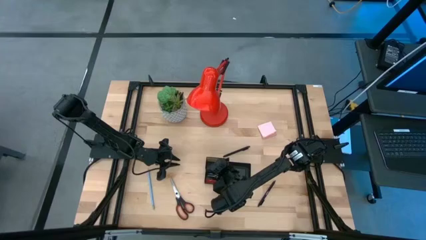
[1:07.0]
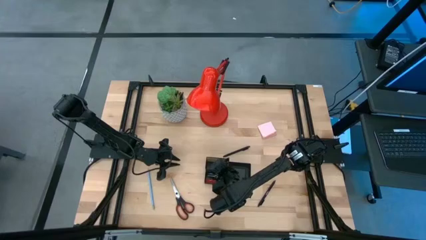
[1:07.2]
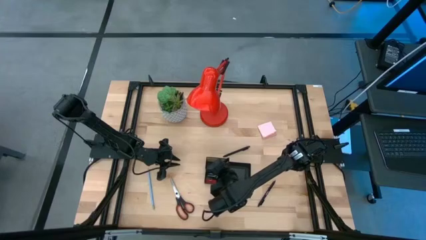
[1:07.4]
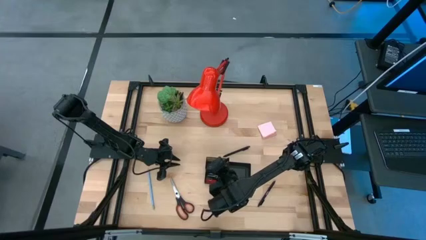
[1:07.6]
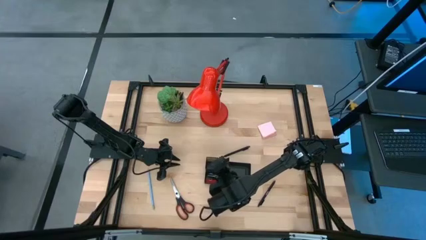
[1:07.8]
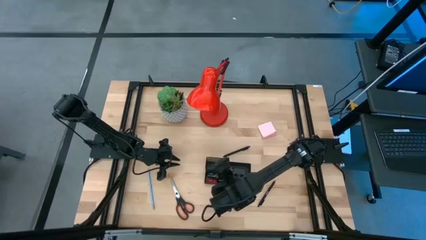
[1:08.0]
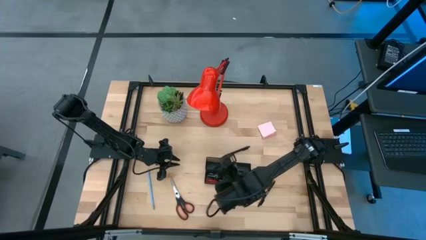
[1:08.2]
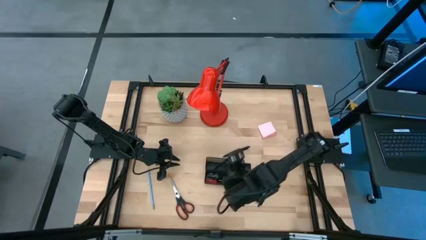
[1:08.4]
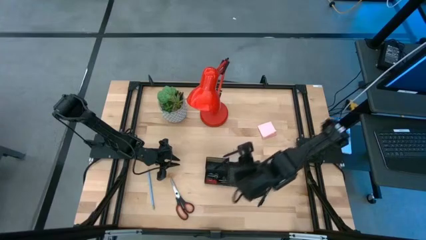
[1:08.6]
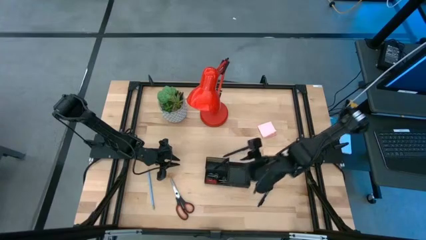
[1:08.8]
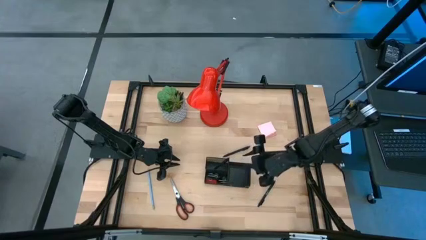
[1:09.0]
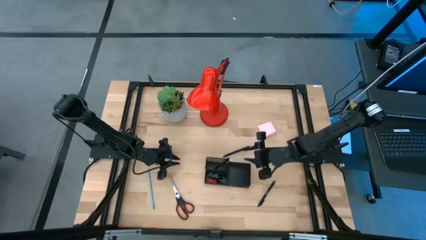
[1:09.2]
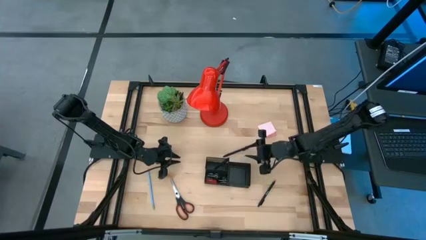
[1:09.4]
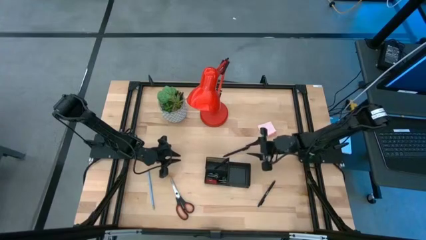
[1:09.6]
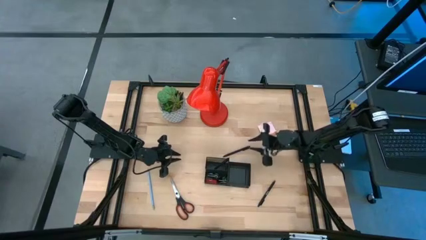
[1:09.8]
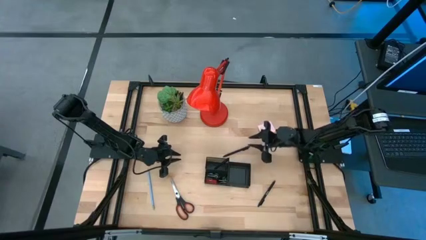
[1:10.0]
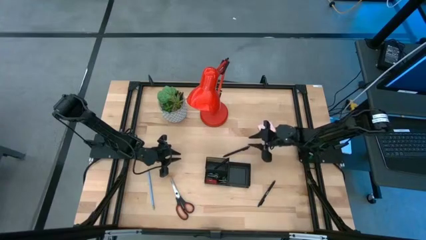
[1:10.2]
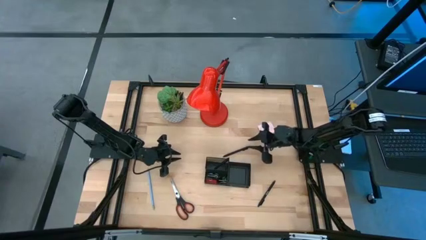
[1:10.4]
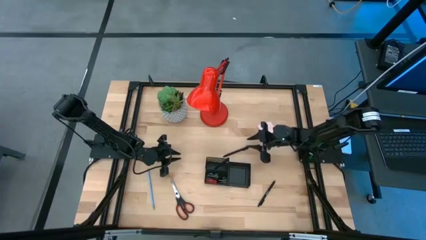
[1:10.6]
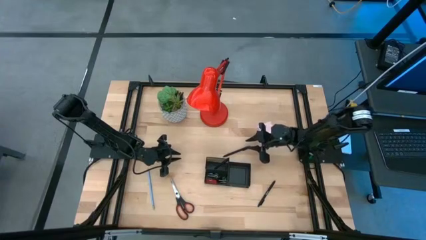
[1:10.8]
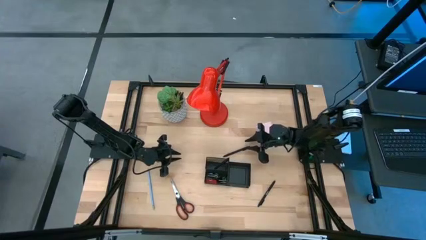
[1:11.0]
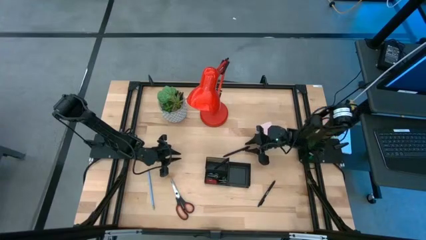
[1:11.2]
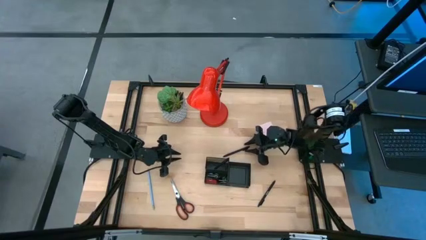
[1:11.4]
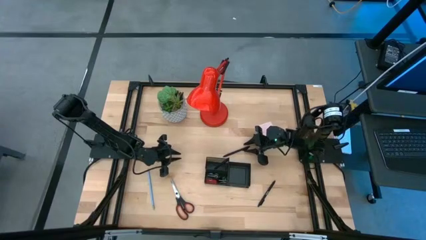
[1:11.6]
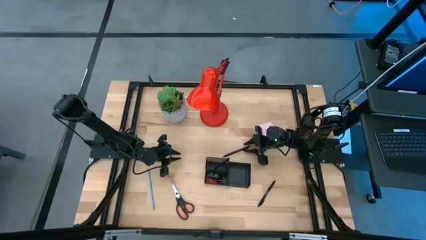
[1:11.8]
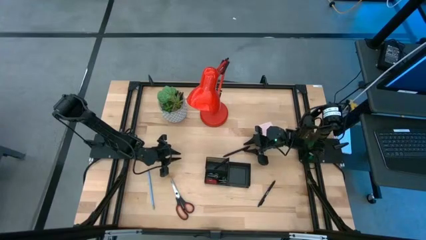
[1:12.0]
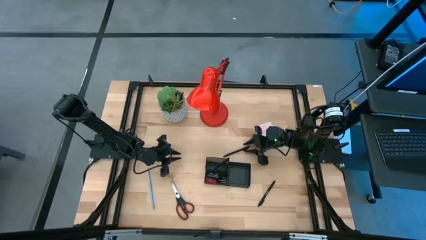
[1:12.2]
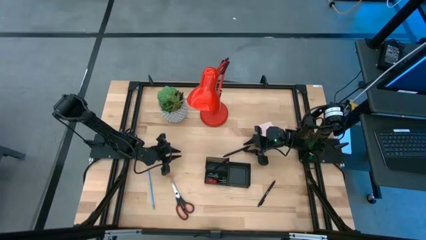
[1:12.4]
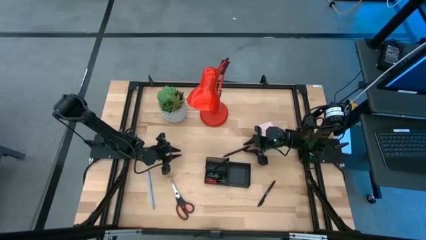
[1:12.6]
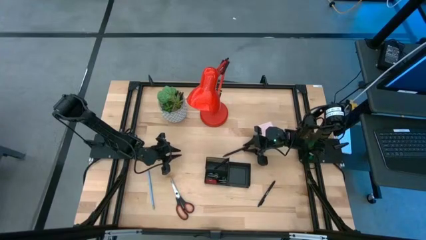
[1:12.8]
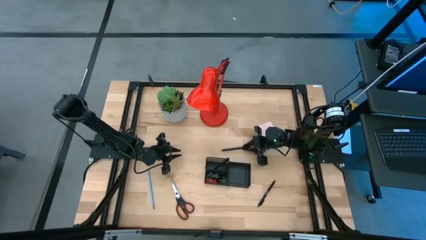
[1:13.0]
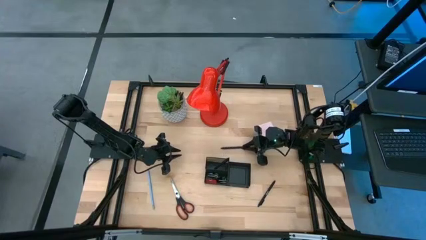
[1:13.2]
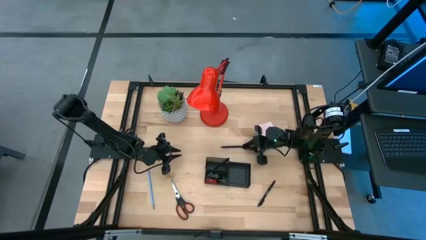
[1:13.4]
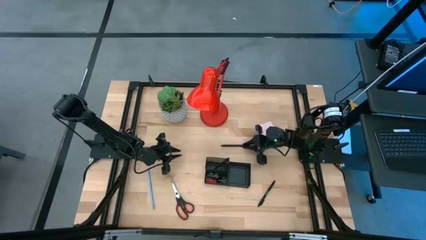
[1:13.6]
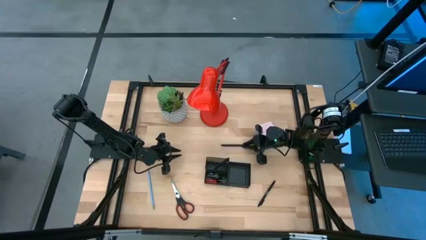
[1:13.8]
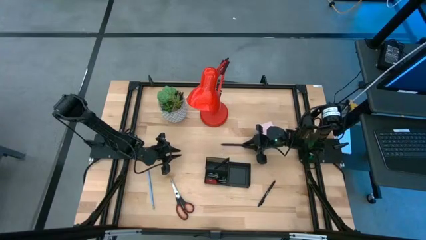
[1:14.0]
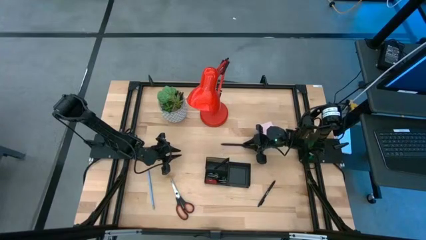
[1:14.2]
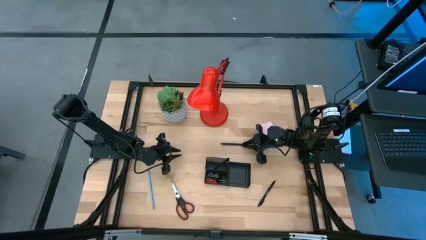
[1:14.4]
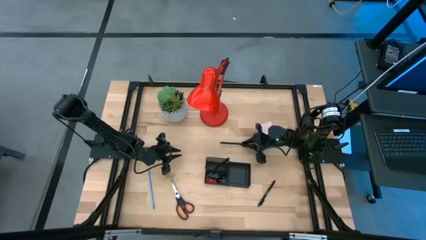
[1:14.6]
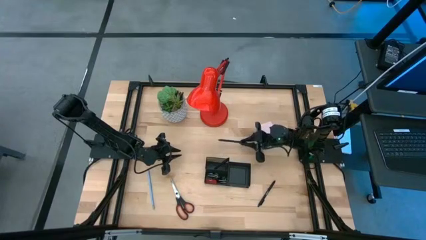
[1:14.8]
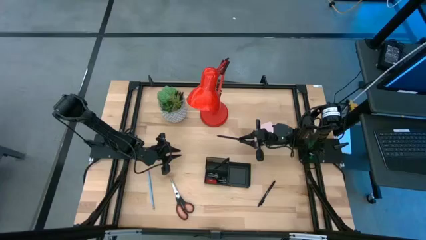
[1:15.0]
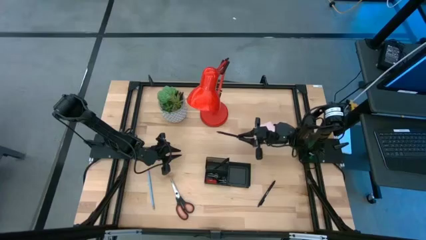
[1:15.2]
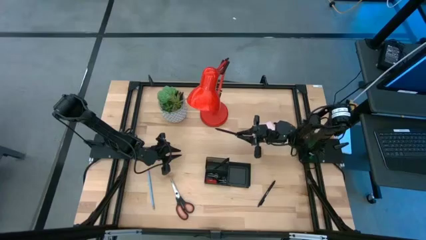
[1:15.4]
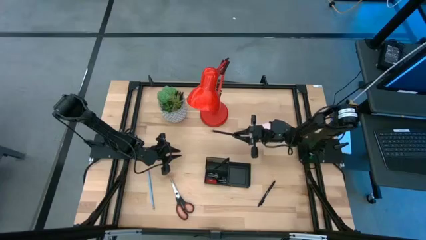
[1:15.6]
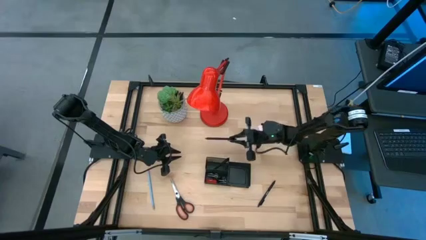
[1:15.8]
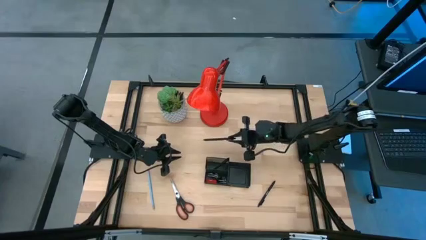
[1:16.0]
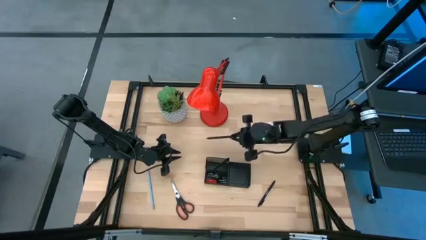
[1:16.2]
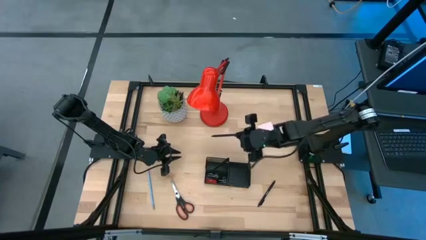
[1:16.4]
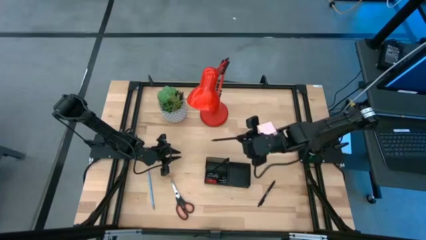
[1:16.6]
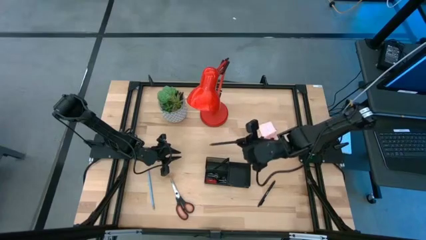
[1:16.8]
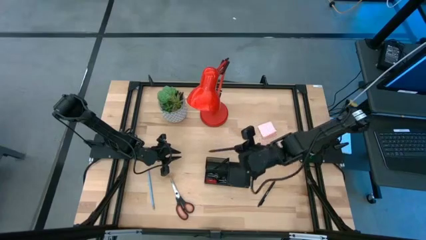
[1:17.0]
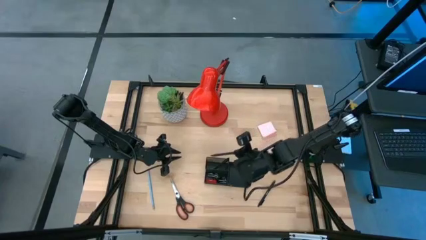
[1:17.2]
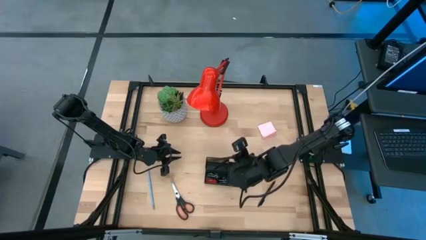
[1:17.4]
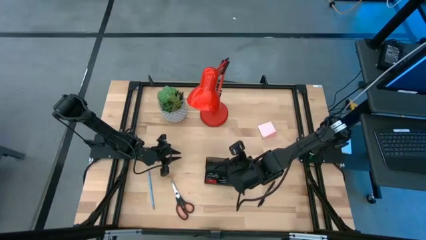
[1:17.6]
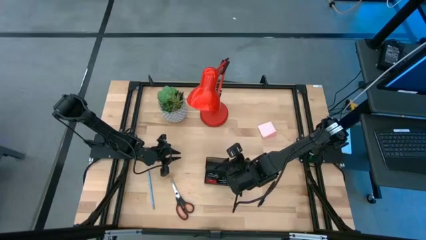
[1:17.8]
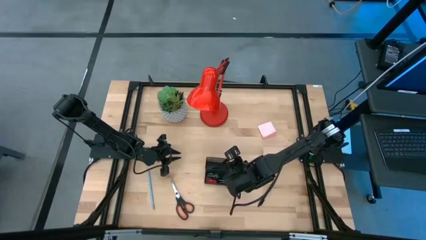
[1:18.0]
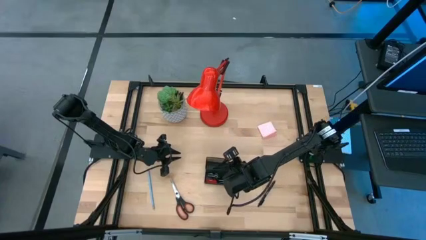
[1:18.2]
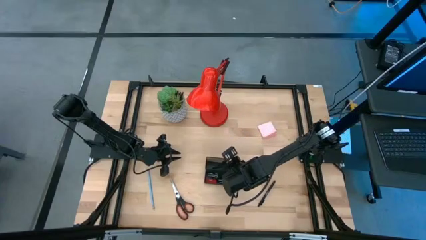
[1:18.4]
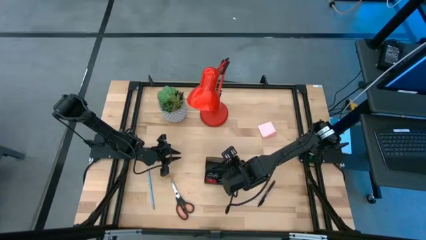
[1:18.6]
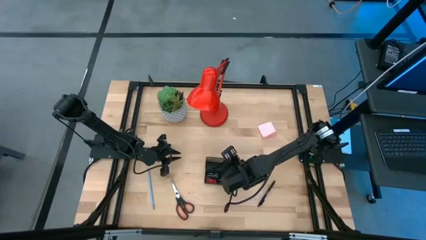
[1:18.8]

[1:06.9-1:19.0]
Task: Pick and place office supplies into organizer
Put the top black pen into the black desk organizer

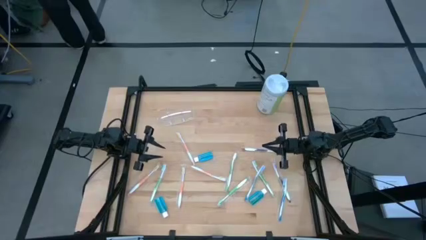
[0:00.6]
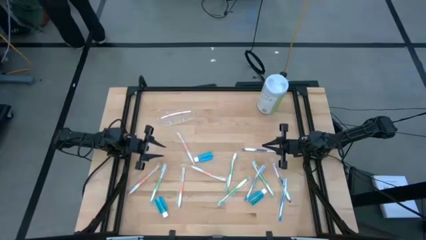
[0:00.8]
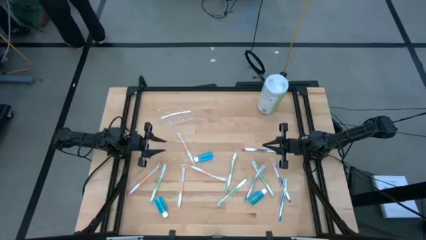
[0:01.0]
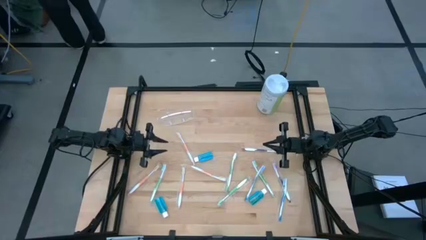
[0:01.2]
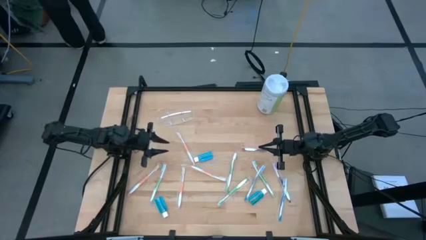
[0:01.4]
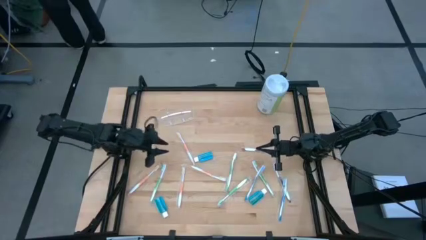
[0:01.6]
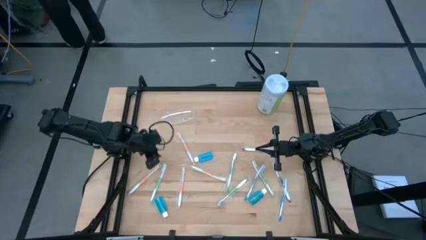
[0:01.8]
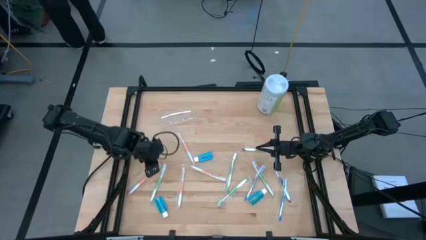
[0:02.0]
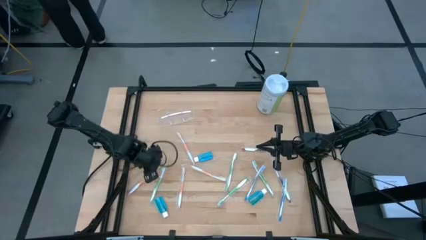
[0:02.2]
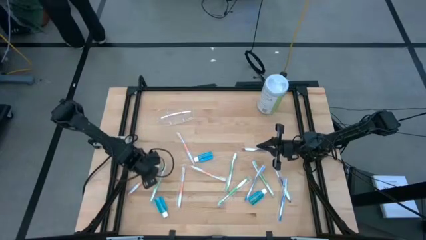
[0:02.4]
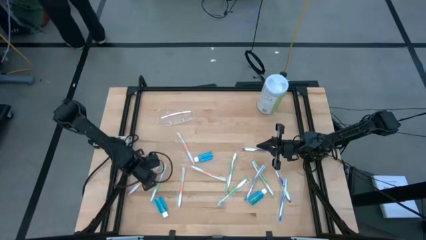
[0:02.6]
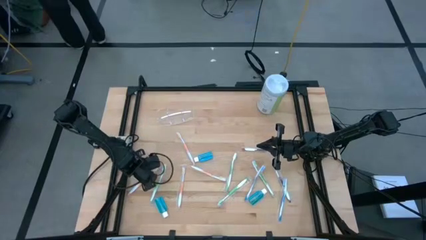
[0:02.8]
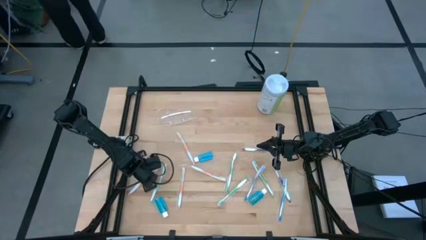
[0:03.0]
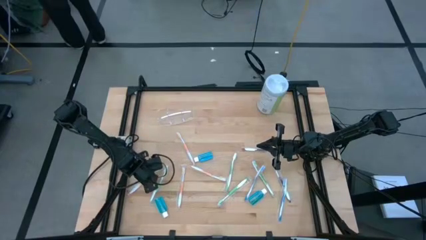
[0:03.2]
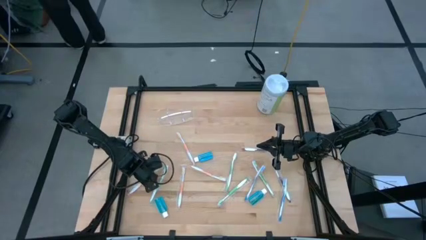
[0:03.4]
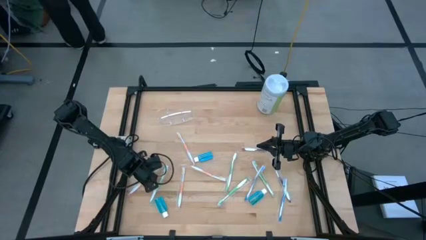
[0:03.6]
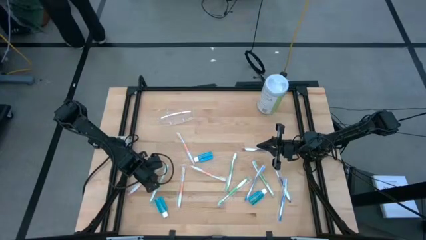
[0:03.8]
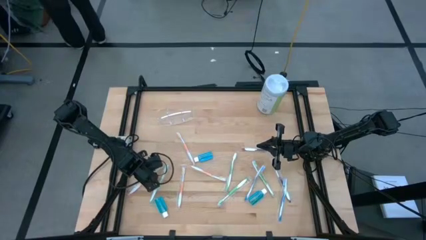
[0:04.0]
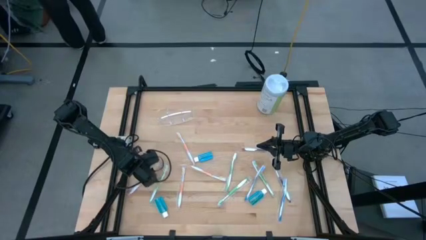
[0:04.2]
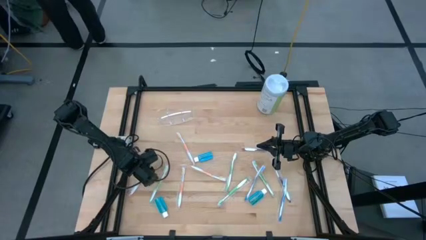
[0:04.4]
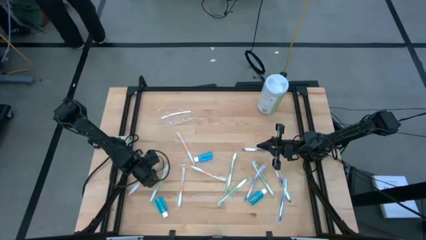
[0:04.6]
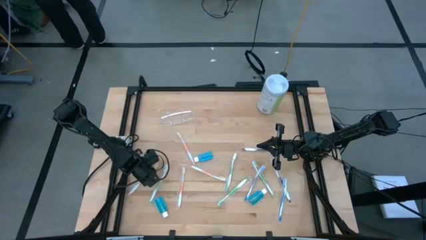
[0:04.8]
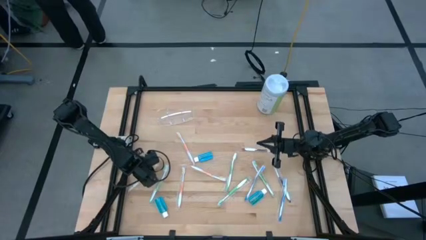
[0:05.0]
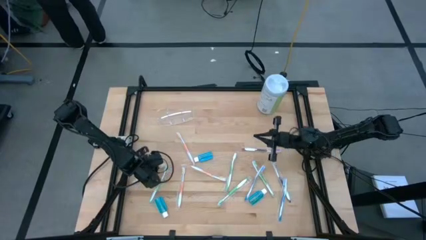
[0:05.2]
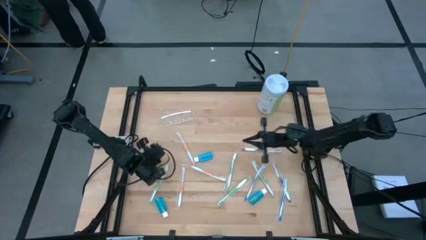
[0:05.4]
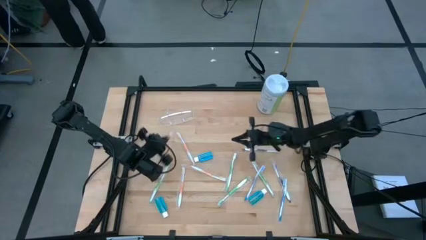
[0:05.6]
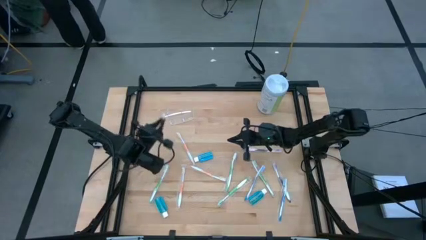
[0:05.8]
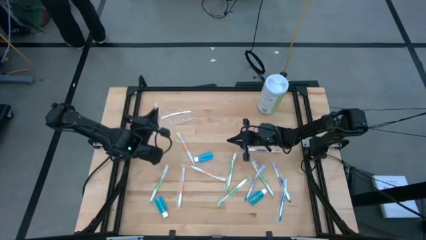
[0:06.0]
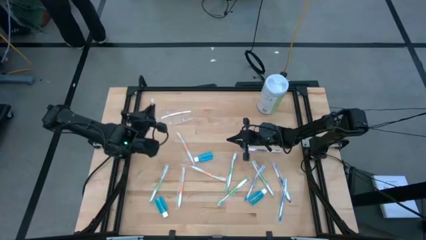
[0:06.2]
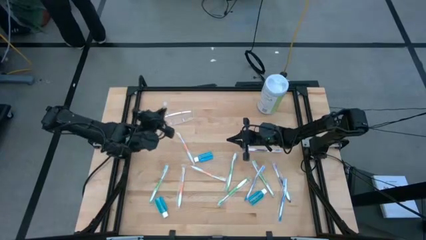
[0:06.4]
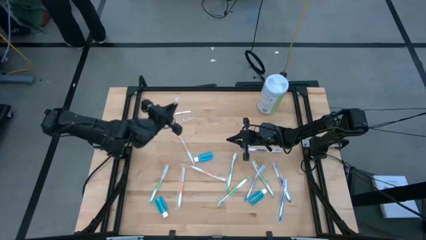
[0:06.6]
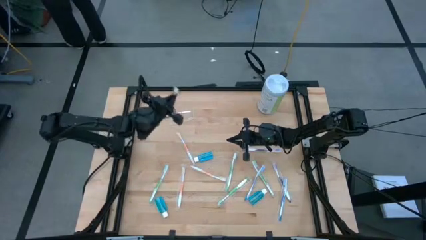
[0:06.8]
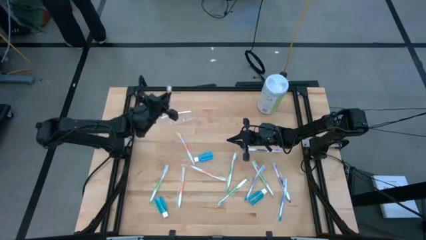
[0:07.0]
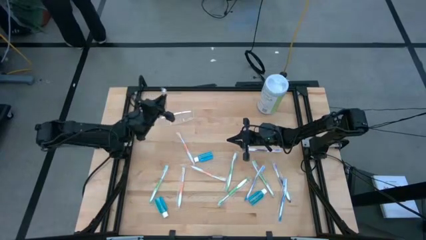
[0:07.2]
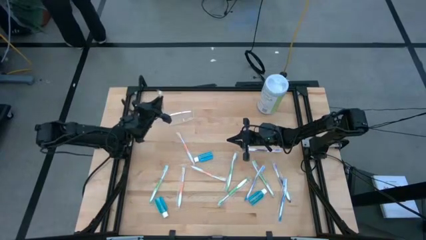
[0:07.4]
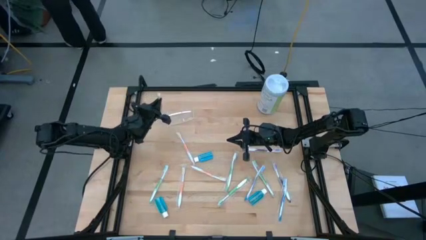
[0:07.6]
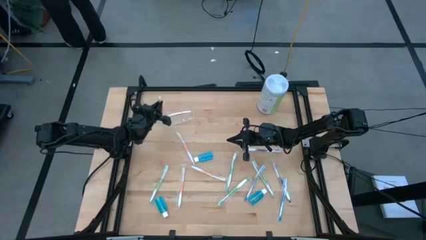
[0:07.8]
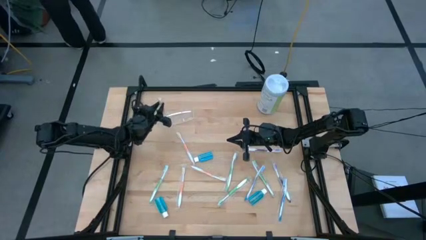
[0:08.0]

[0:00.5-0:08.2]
Task: Pick & Place toothbrushing station
Put the orange toothbrush into the transparent organizer
